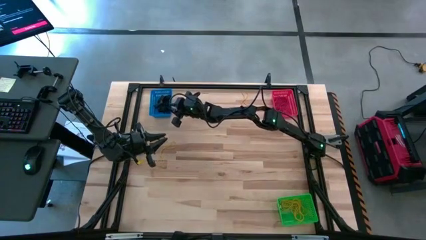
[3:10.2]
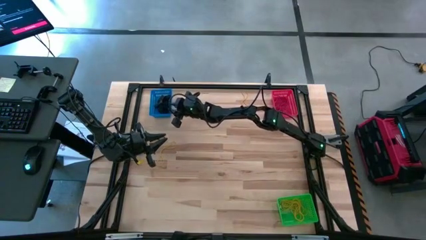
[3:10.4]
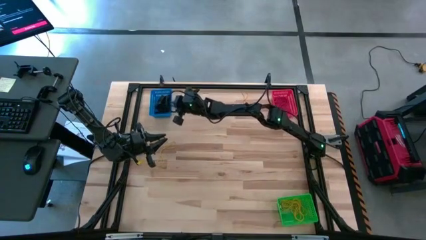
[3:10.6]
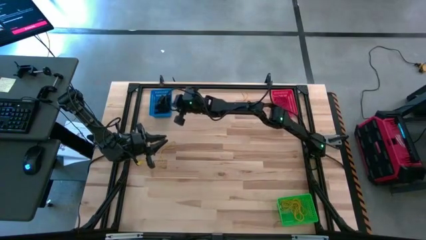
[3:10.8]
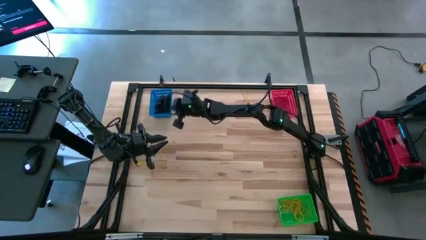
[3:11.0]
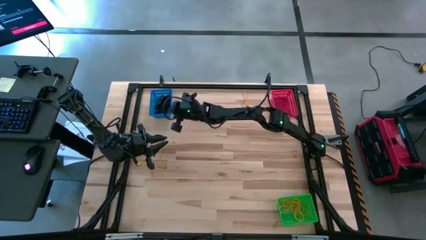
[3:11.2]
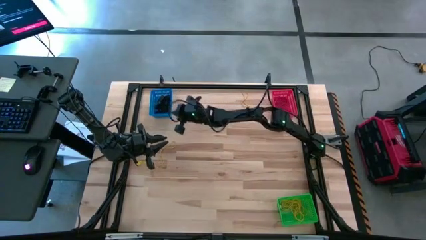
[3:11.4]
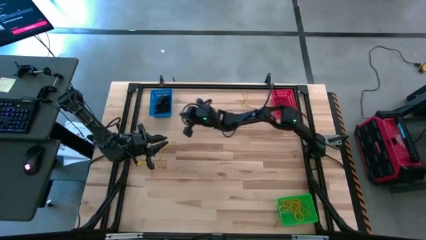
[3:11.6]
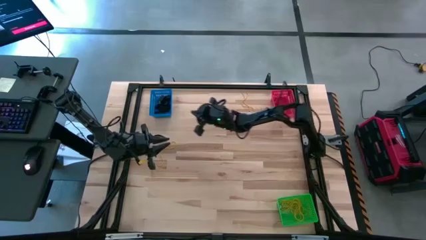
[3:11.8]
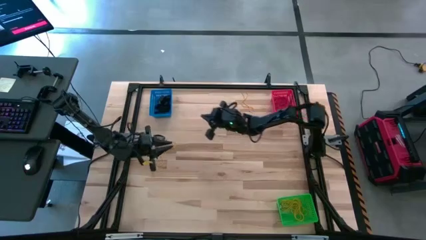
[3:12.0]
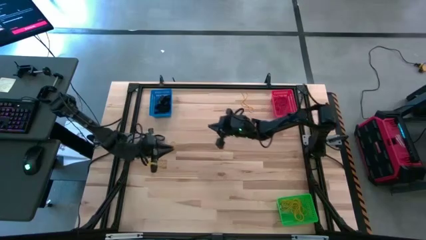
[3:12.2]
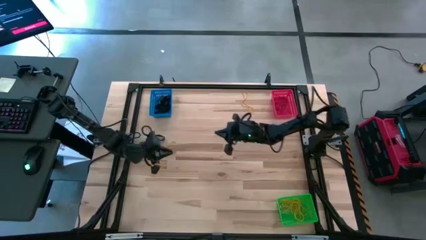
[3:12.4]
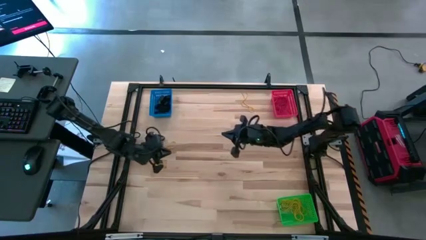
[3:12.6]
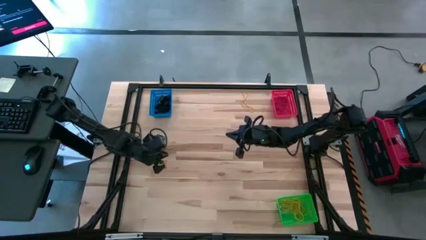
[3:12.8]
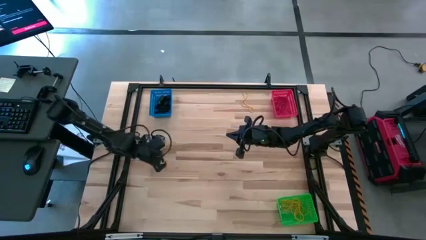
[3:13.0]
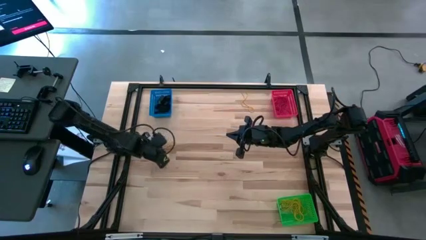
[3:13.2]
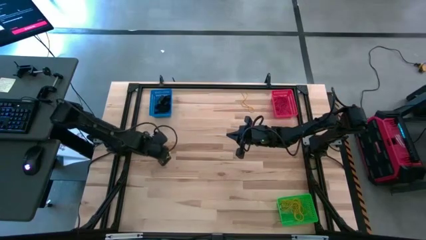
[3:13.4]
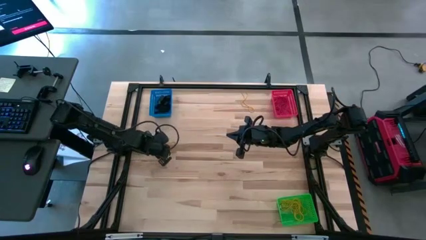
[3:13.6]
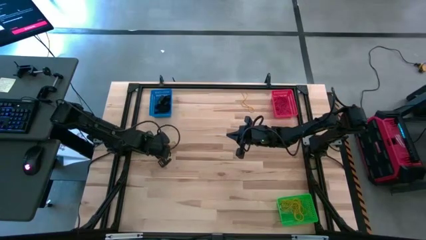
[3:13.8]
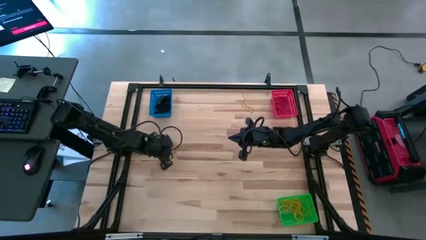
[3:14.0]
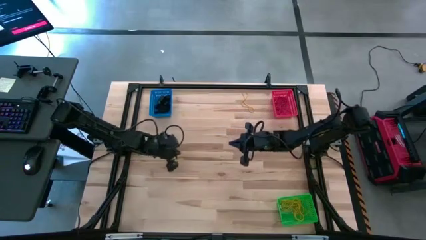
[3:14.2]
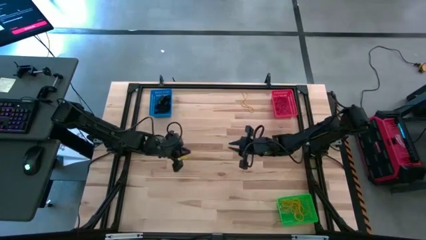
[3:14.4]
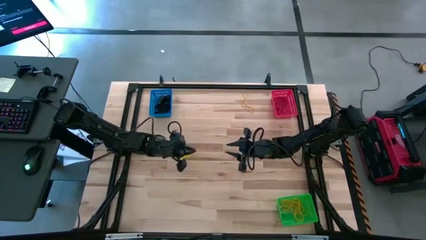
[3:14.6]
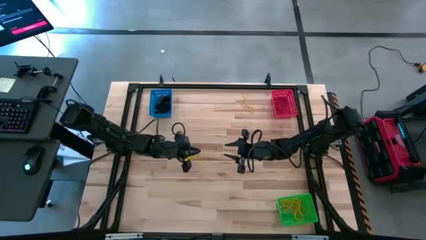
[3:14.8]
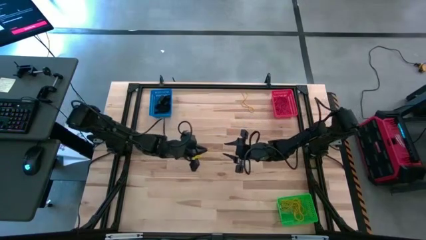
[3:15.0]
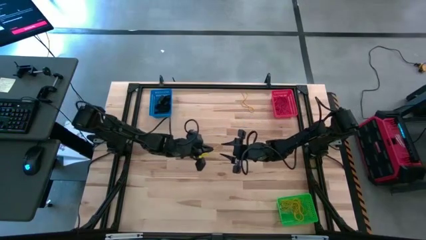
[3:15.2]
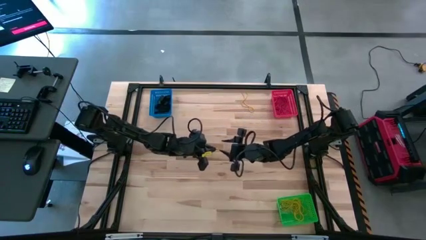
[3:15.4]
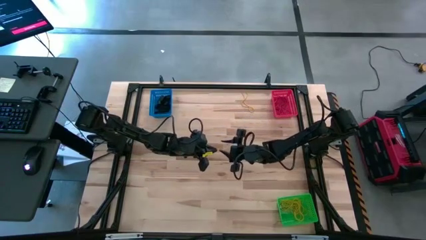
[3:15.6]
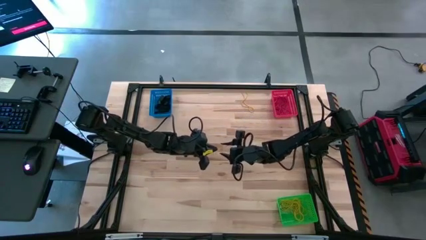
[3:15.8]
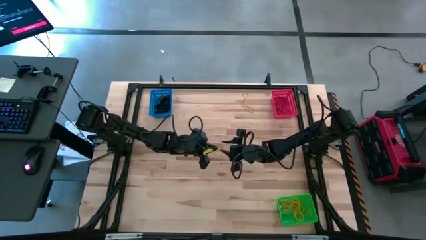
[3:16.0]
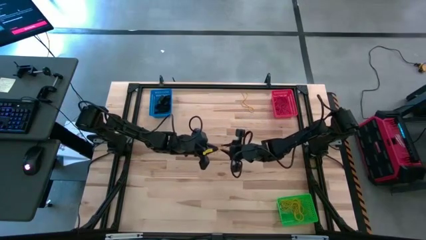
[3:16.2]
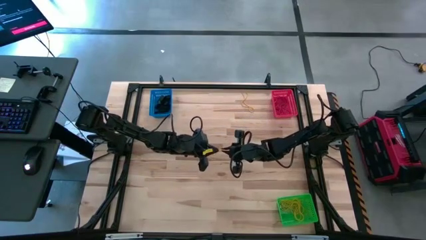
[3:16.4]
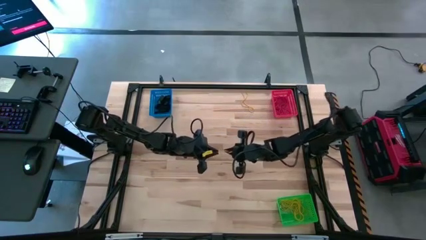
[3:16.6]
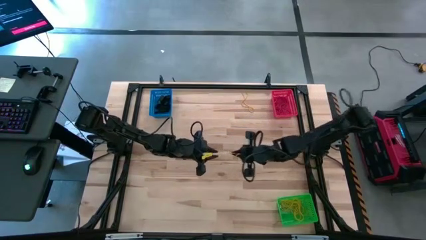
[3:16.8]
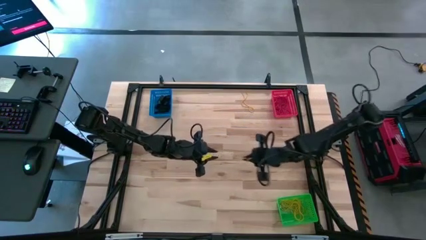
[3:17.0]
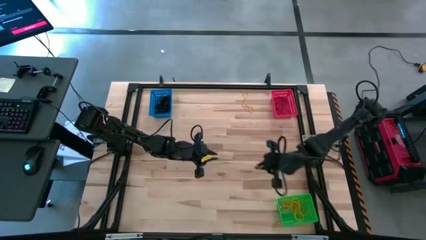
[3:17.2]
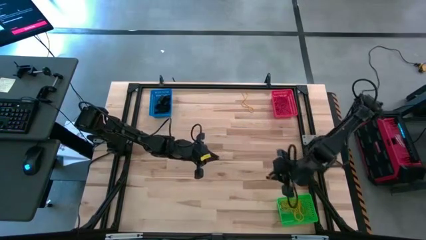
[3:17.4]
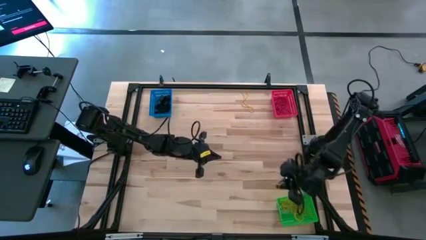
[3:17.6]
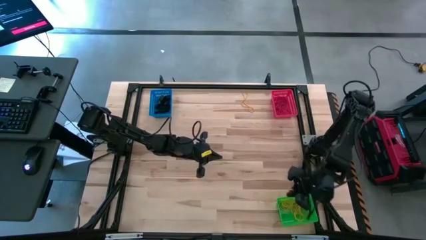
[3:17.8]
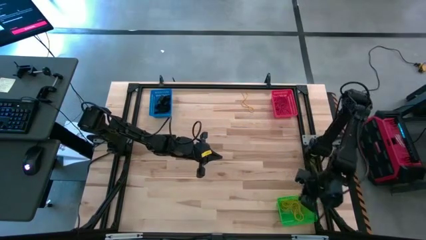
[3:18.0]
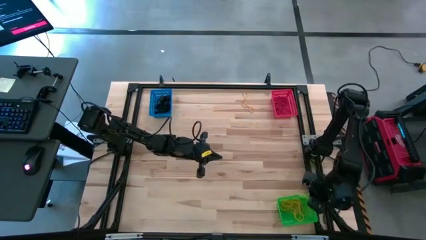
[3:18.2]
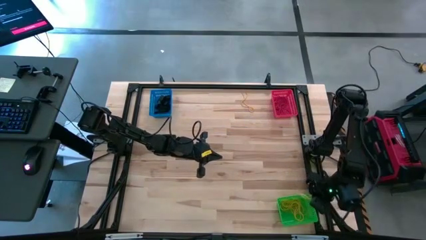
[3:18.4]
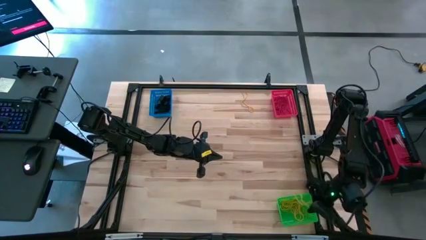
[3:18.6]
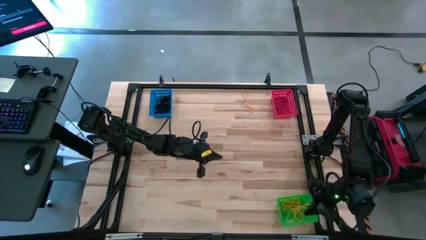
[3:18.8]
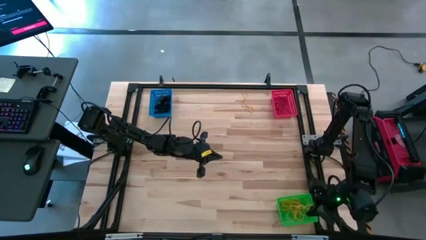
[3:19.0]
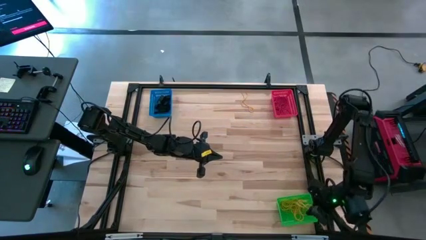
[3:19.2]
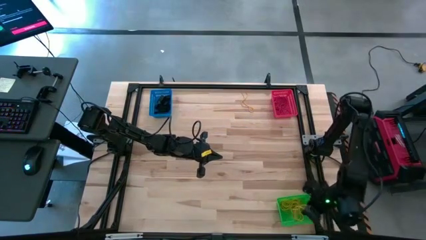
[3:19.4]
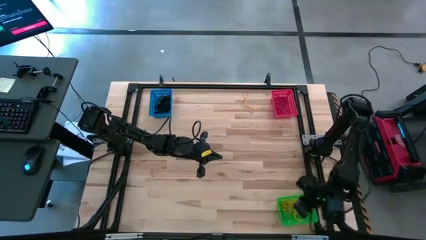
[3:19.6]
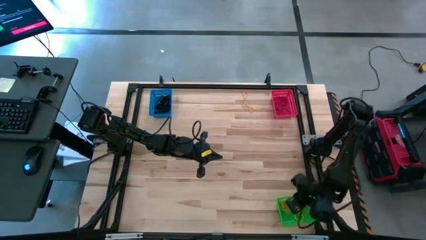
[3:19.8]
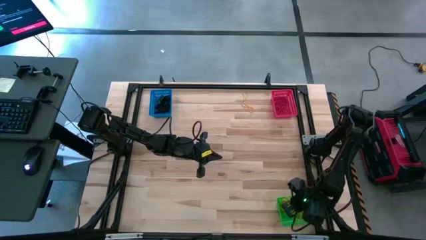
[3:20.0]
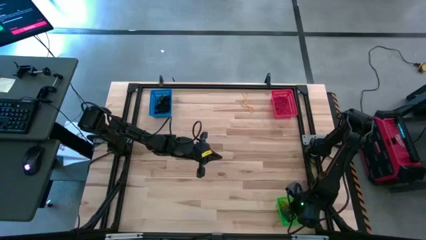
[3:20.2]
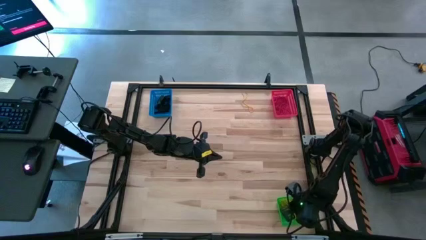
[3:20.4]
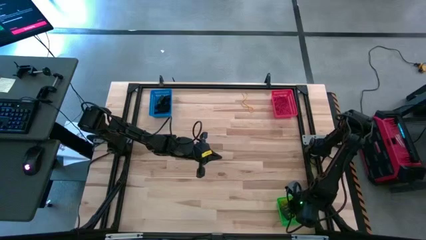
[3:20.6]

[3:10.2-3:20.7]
Task: Sort rubber bands into baskets
Put the yellow rubber band into the green bin

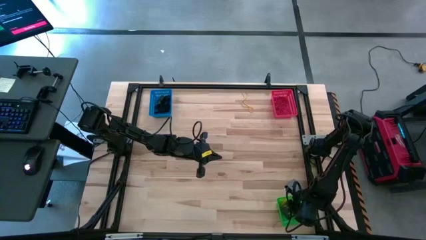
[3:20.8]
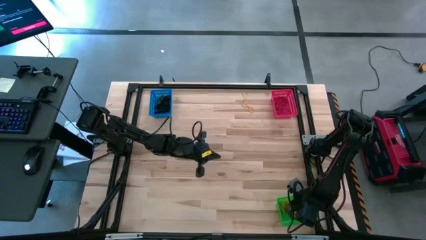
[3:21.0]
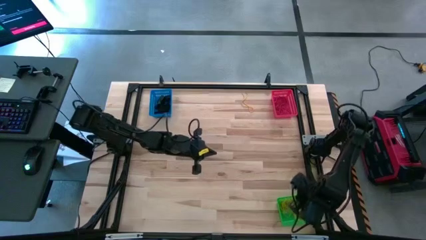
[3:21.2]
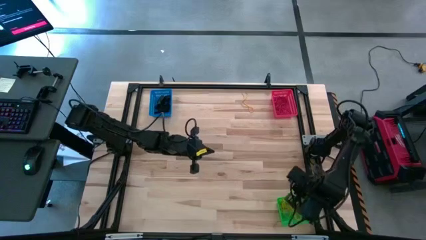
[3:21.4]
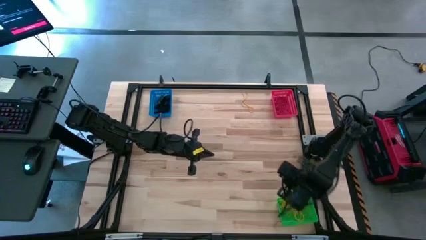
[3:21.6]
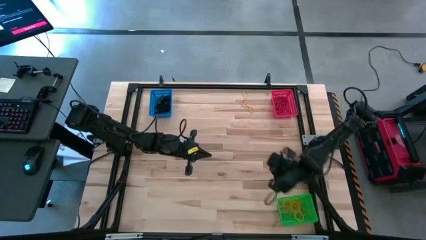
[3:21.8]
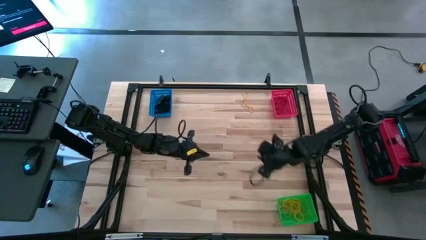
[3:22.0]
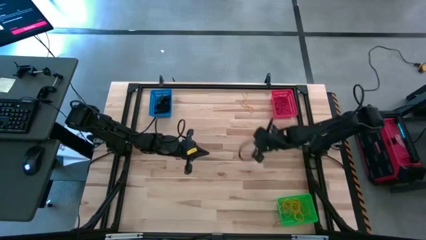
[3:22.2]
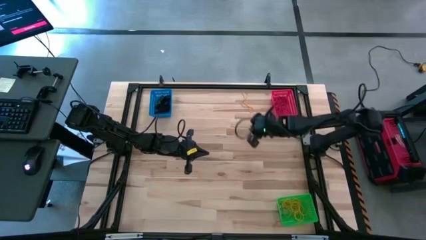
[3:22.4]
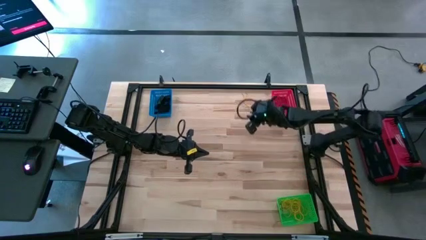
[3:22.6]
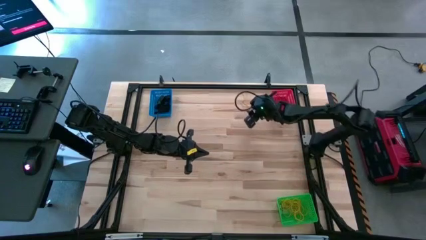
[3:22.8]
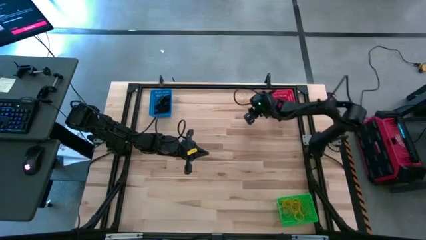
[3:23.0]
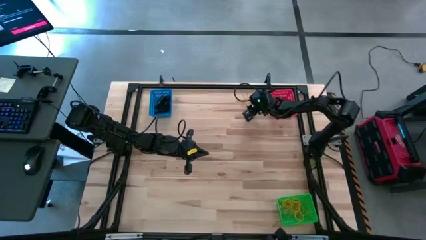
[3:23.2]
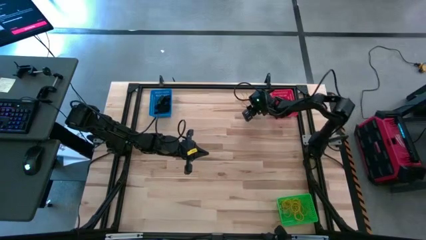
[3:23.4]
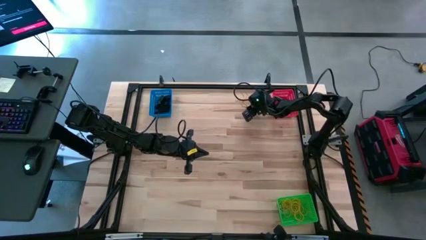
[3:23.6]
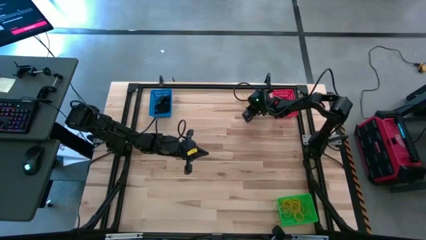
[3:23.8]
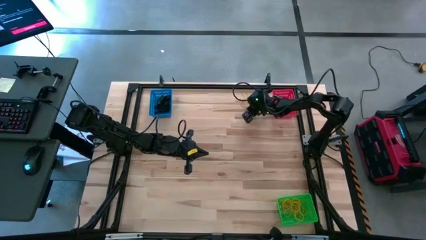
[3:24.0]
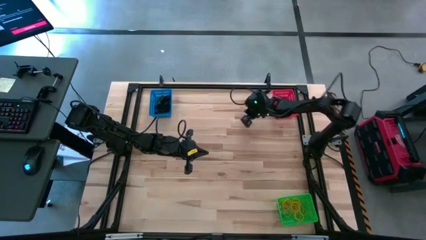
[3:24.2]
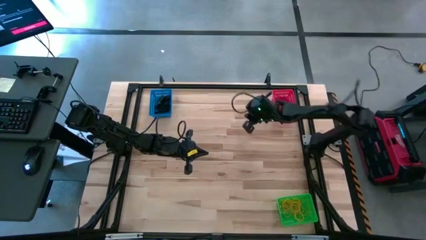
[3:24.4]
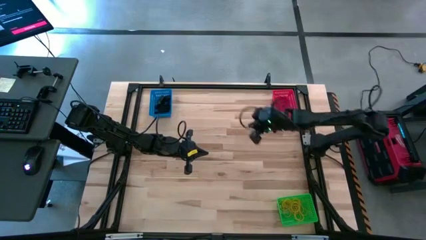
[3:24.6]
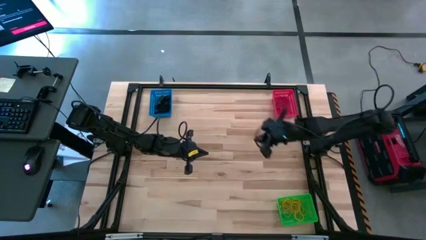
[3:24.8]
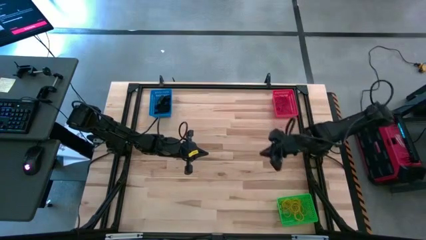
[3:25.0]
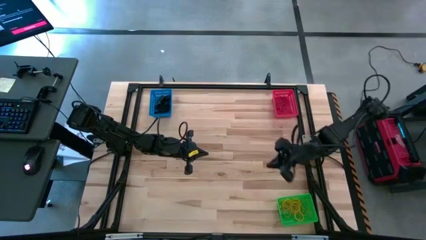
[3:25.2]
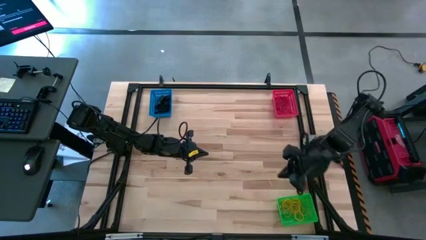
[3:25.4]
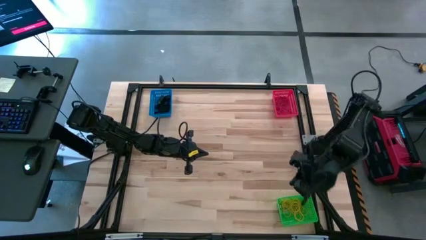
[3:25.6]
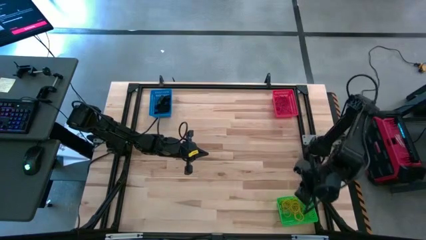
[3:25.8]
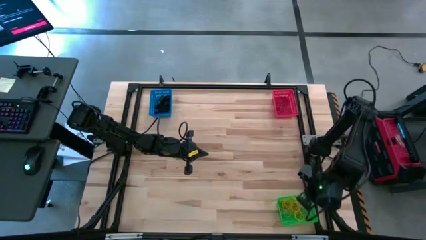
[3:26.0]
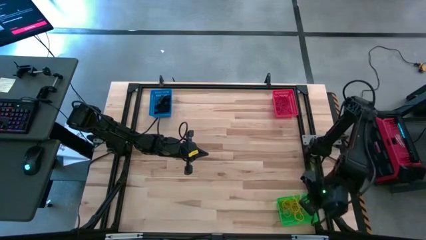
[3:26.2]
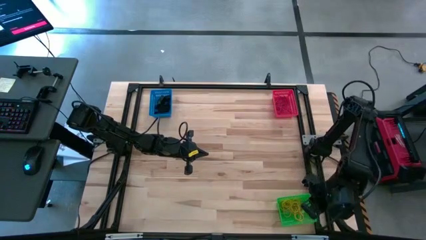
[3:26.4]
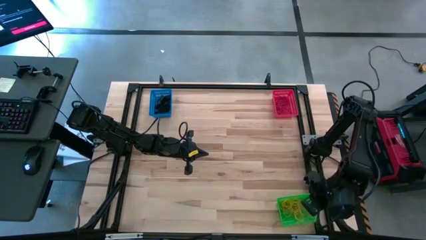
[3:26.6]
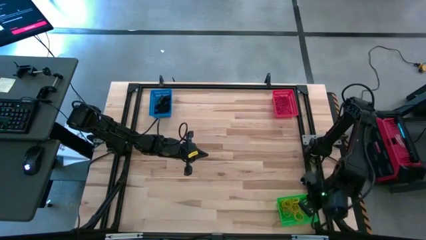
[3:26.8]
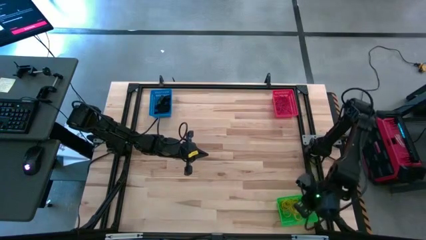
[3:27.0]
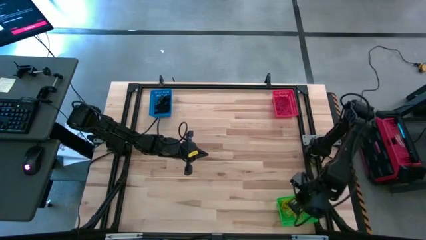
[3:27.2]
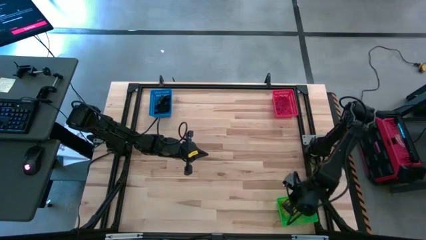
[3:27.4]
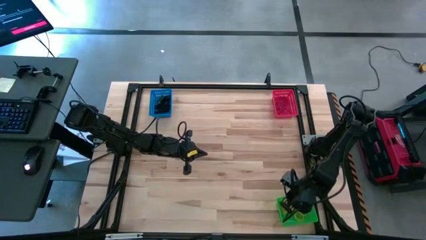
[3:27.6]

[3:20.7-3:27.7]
Put the yellow rubber band into the green bin
